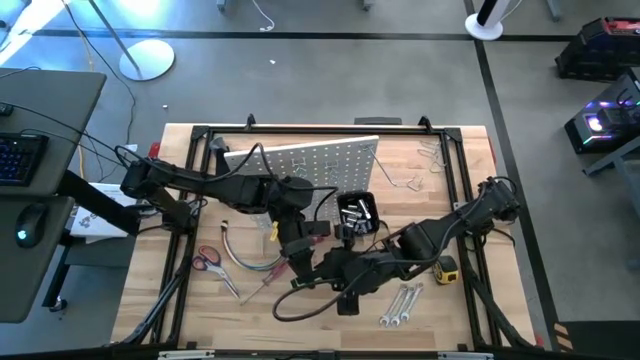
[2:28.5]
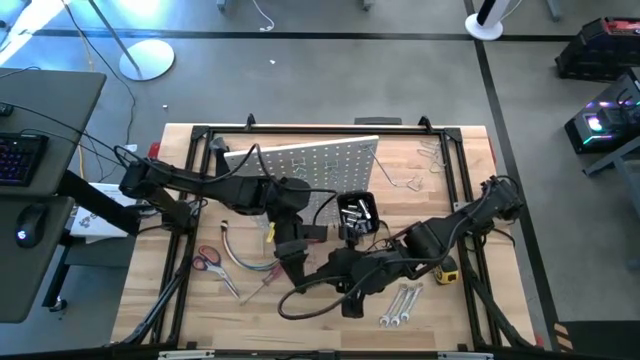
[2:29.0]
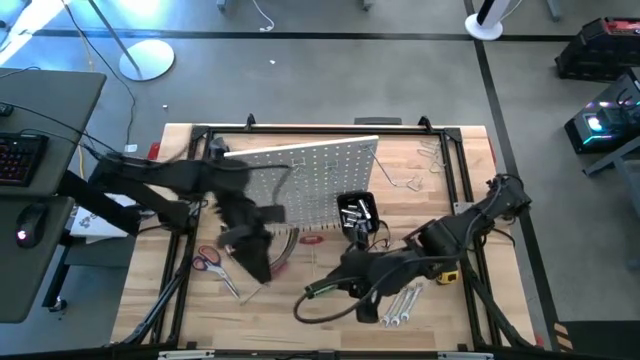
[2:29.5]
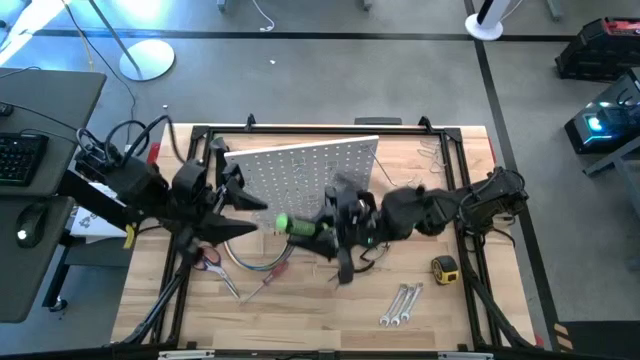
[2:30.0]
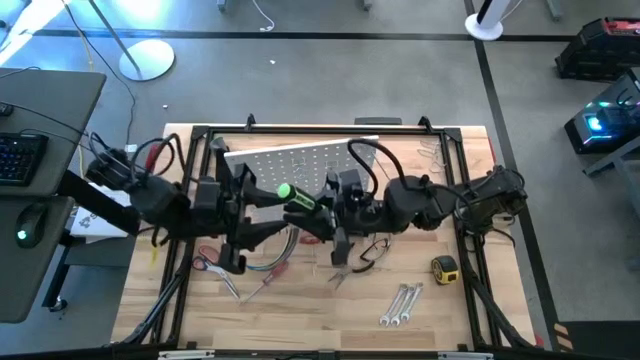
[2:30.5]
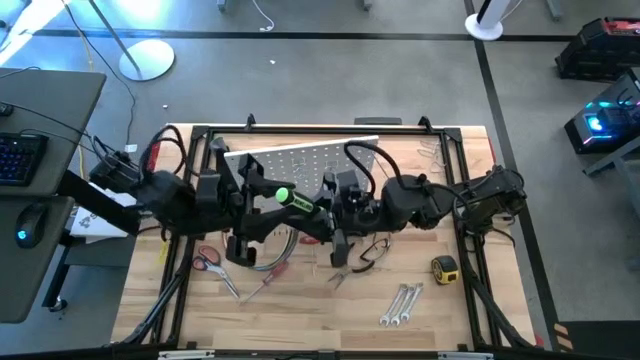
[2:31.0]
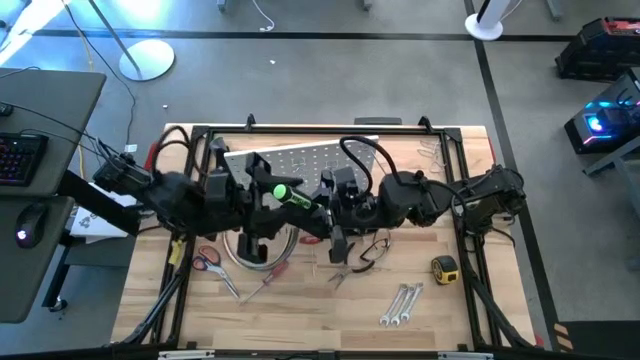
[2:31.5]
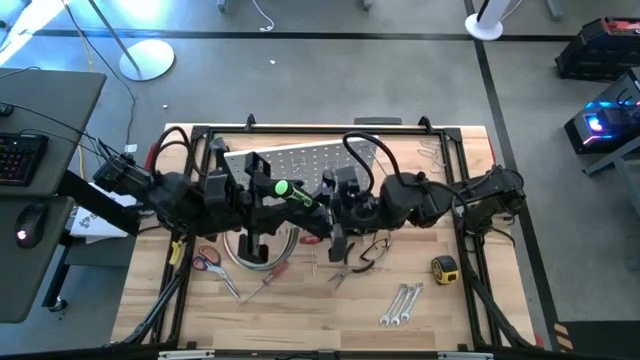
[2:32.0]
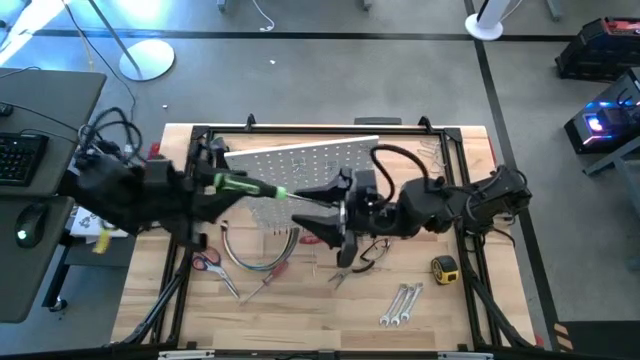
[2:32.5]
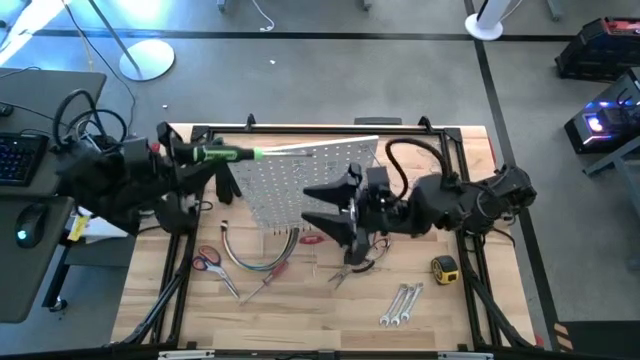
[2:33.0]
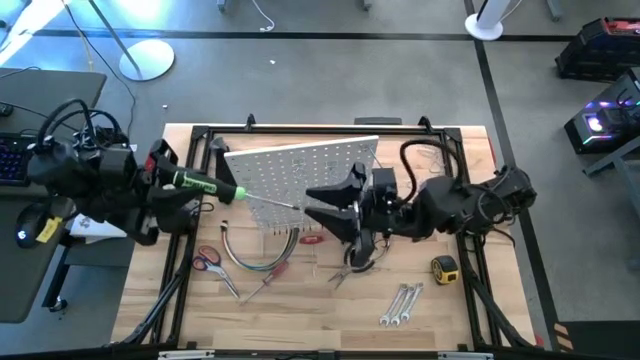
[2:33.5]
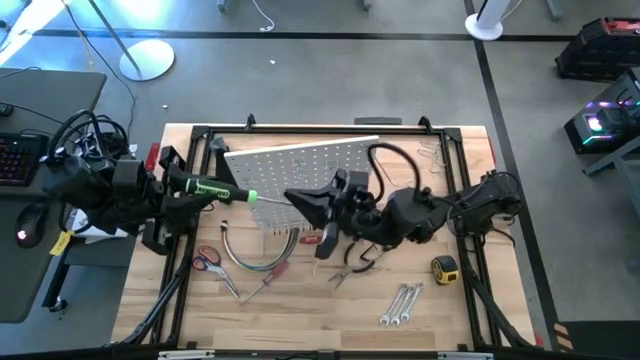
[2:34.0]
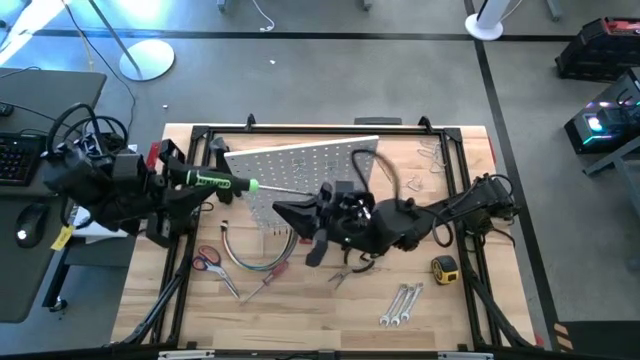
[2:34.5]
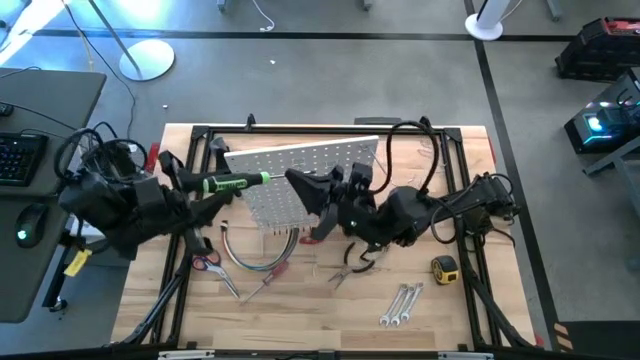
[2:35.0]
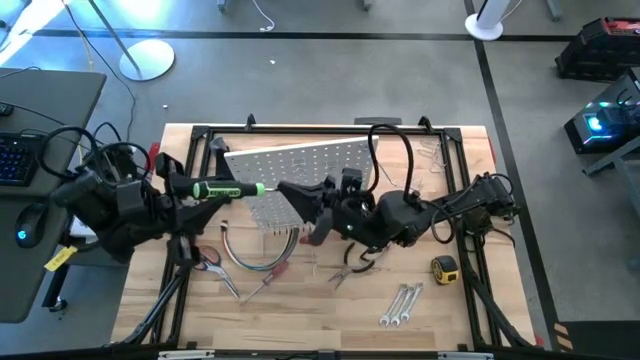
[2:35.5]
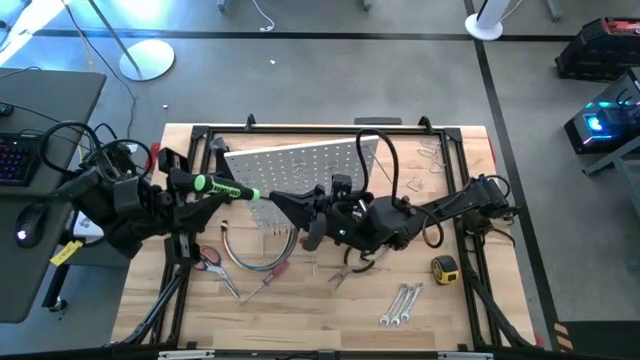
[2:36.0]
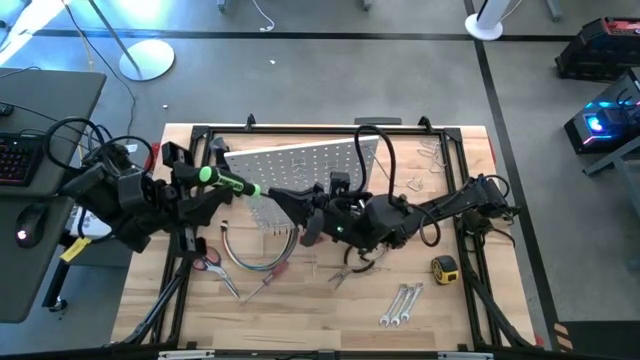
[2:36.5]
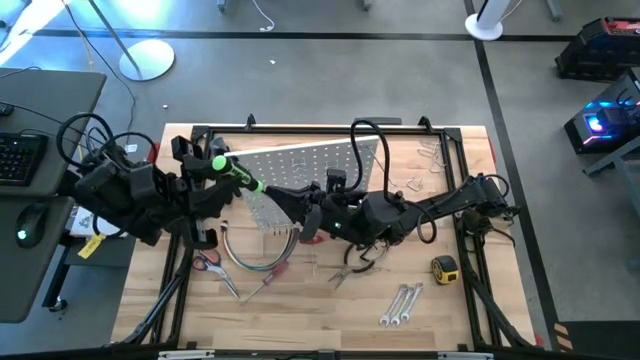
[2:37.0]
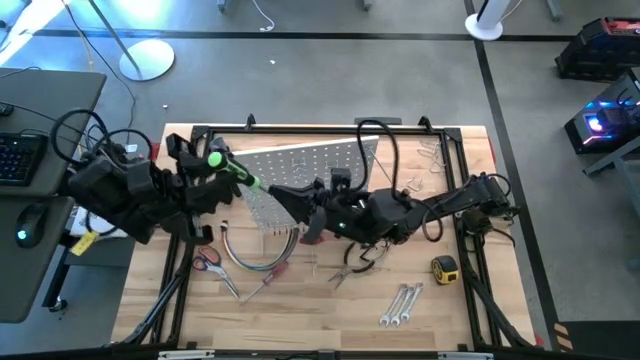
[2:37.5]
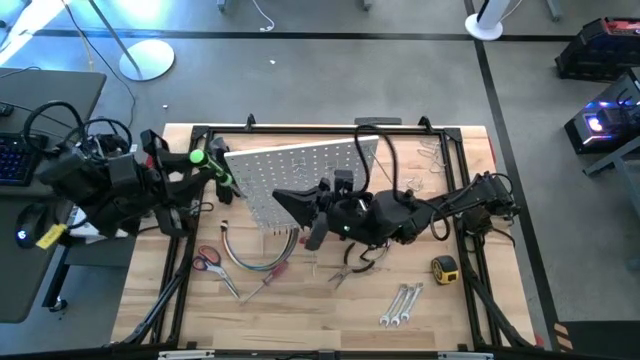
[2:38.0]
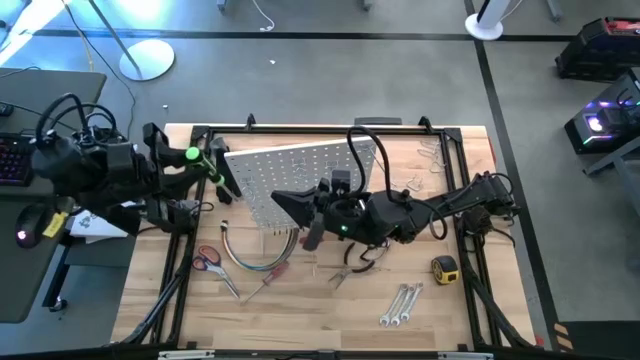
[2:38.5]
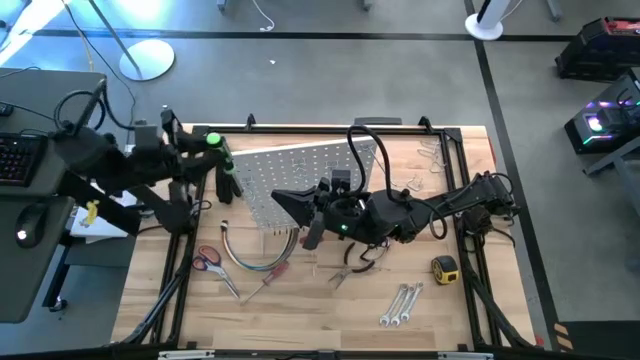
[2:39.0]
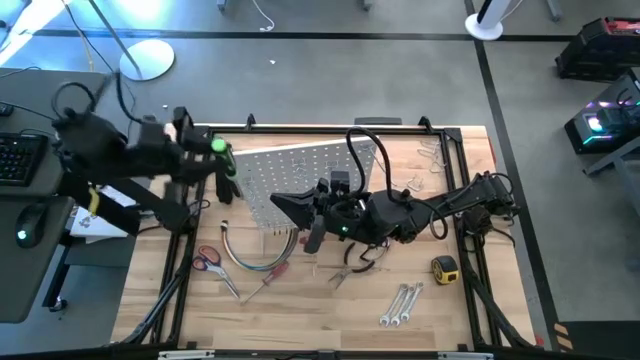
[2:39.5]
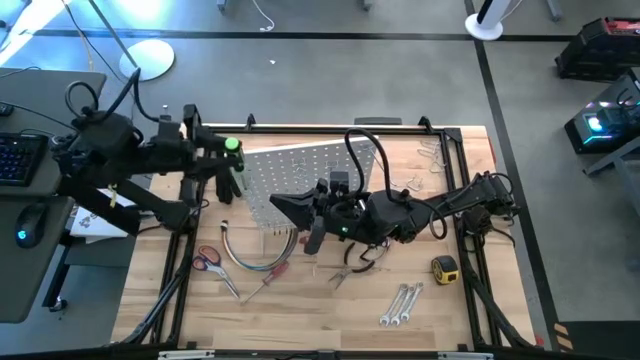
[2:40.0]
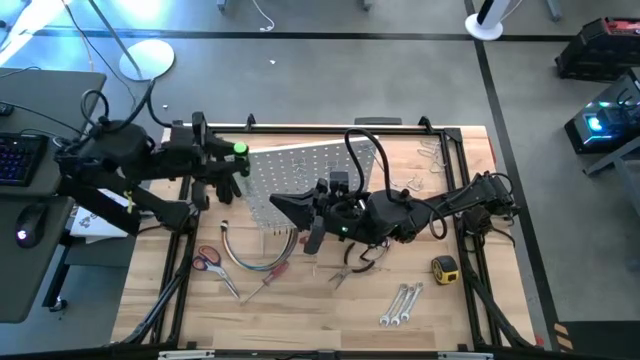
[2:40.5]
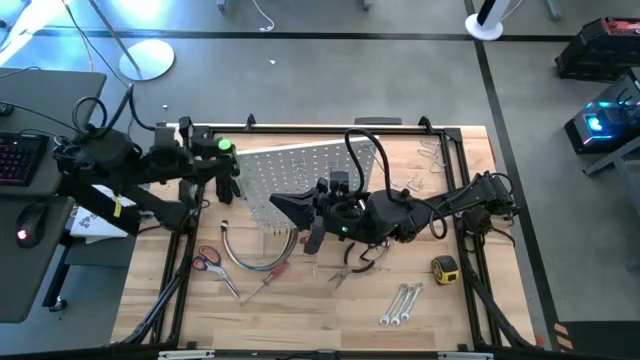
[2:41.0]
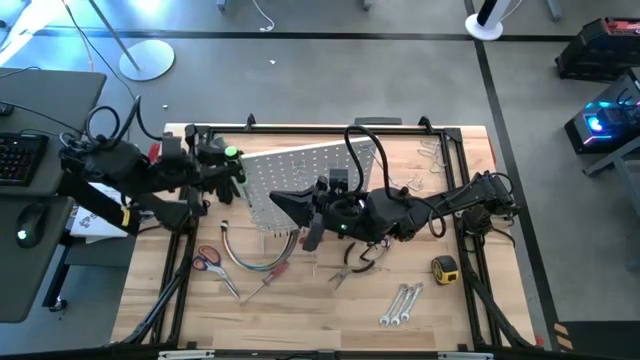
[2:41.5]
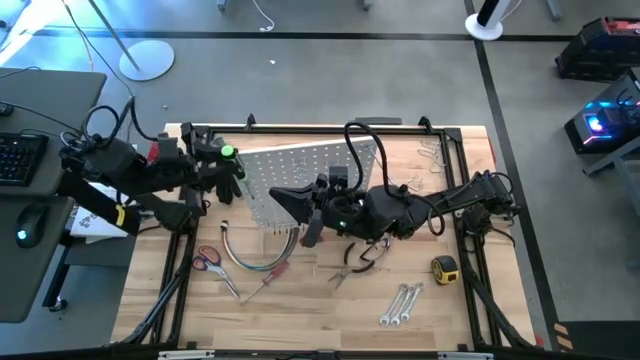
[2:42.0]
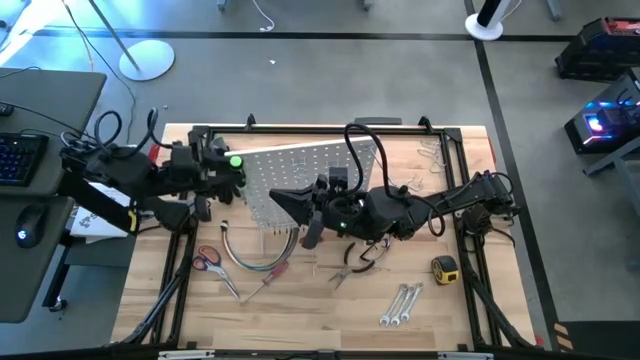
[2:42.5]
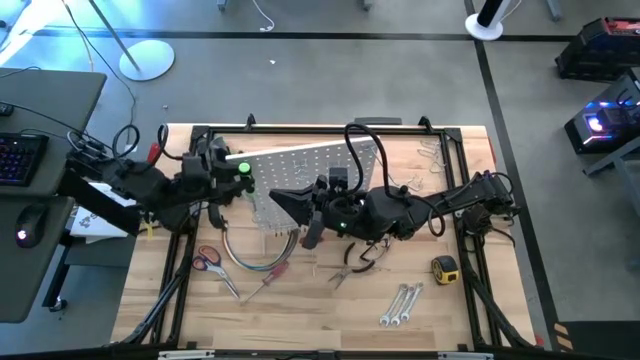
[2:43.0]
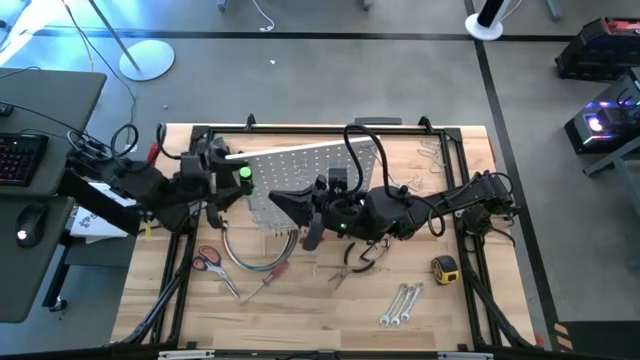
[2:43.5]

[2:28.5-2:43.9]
Task: Hang tools onto peg board
Hang the green screwdriver on the peg board

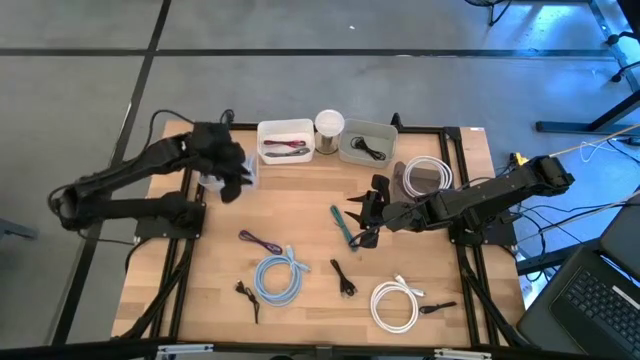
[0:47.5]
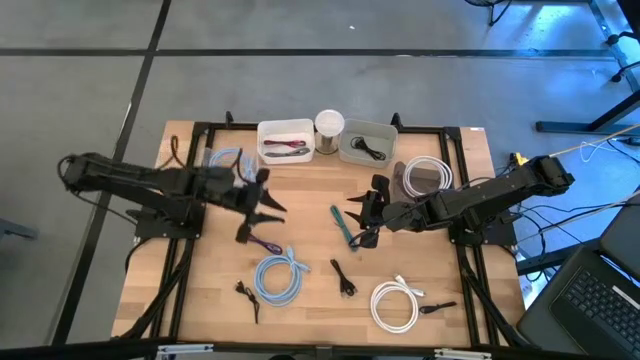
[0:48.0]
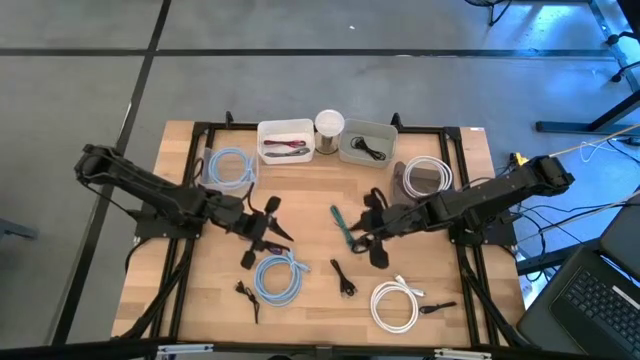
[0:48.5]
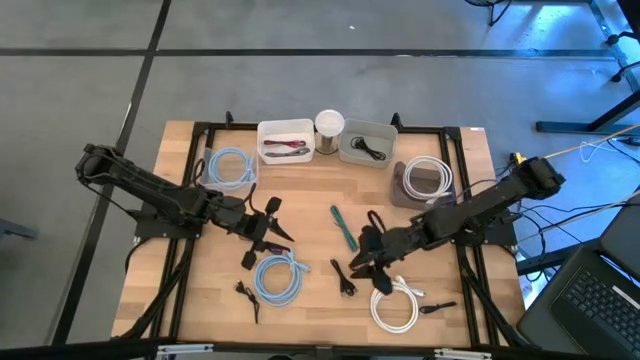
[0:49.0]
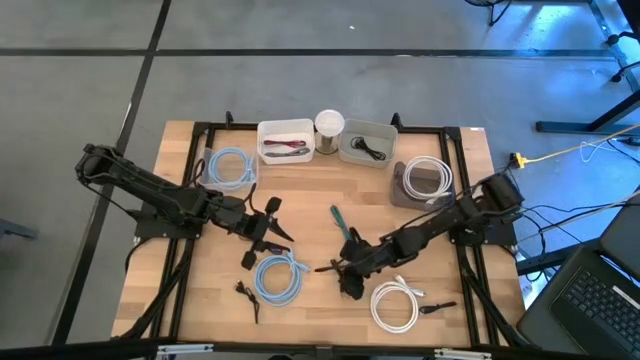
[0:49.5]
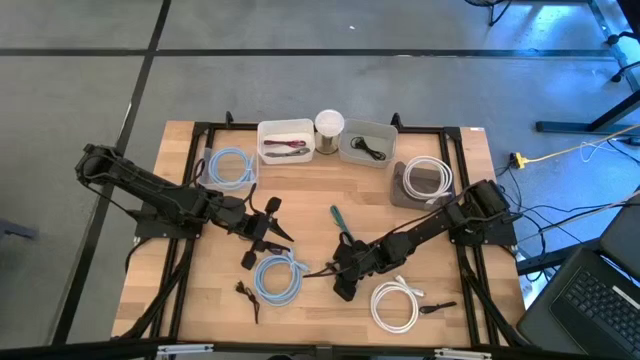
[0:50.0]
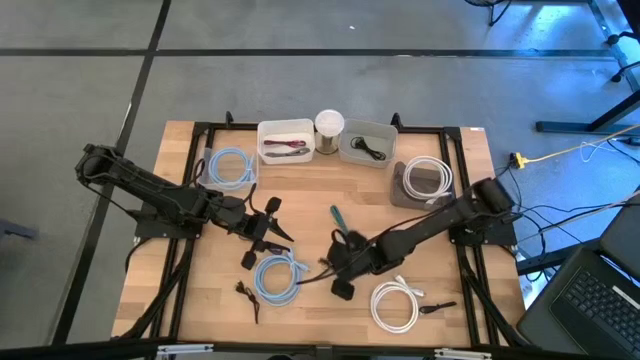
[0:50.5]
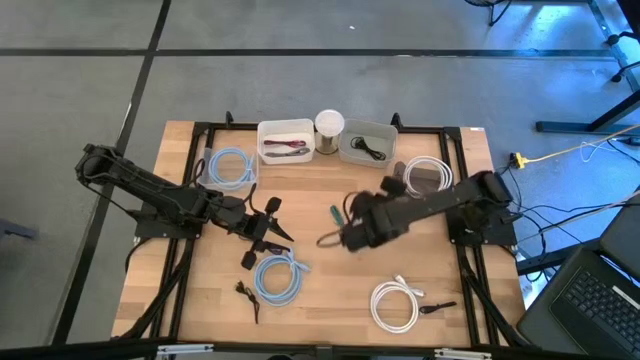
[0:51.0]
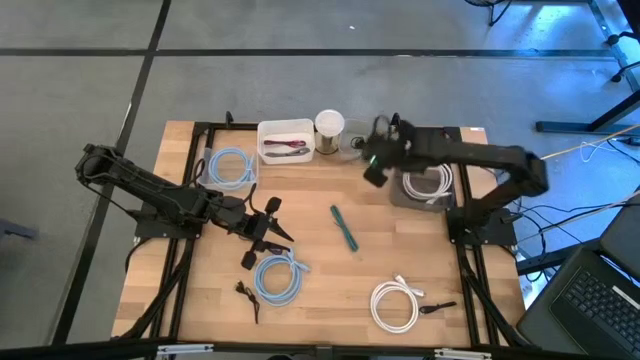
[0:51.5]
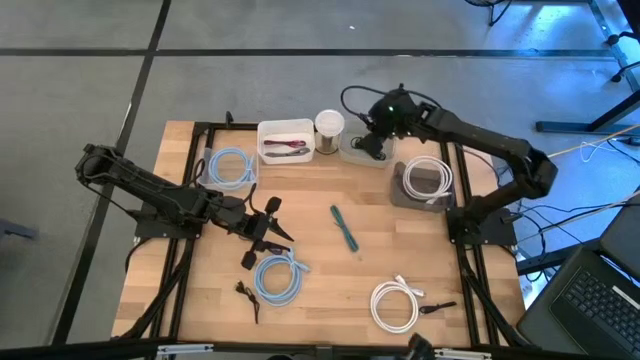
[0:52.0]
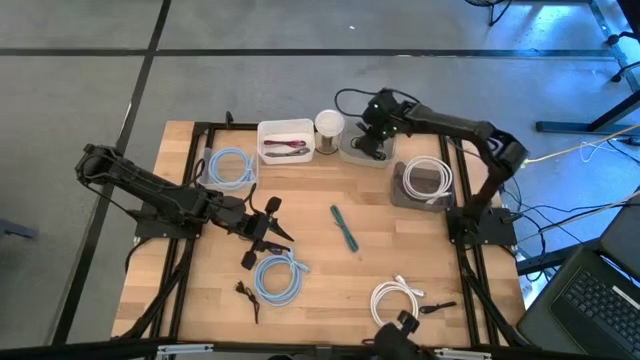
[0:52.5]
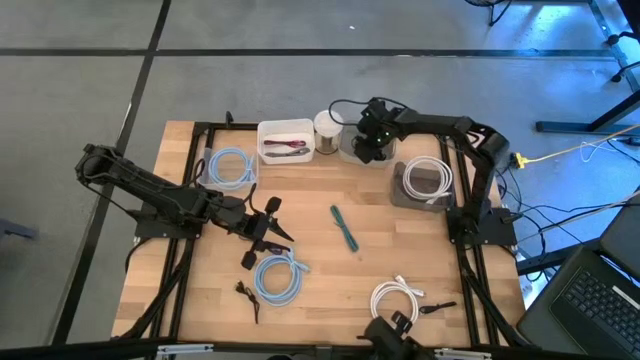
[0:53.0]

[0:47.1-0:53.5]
Task: Pick & Place USB Port
Put the black USB cable into the gray bin
